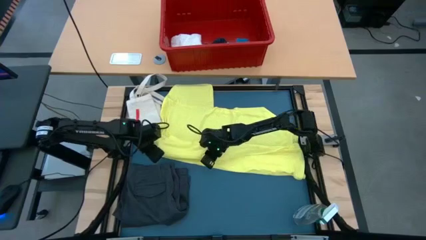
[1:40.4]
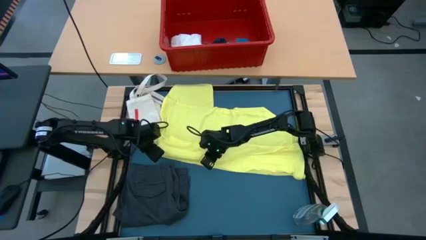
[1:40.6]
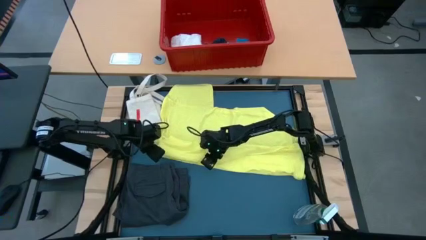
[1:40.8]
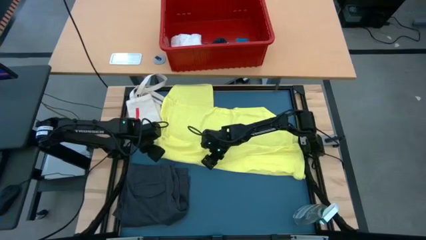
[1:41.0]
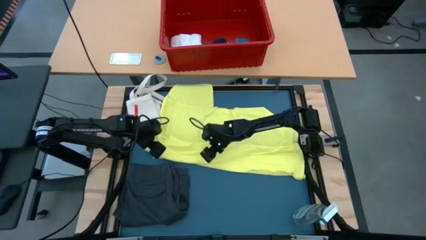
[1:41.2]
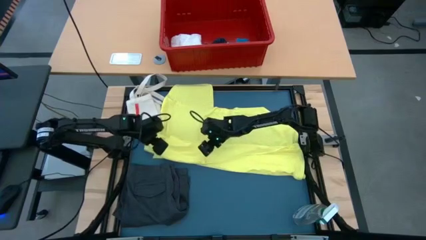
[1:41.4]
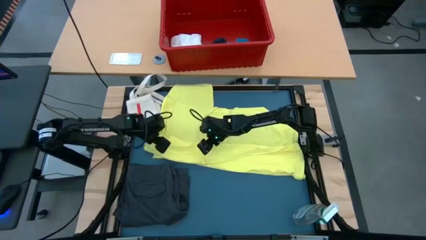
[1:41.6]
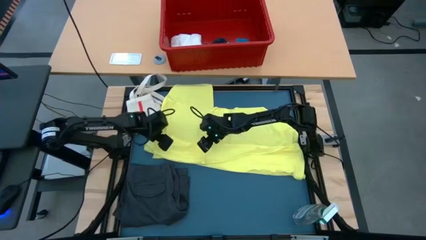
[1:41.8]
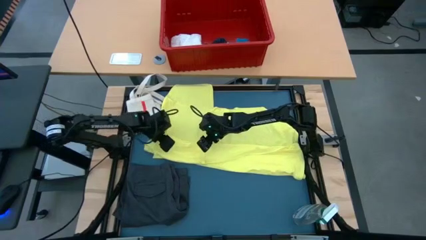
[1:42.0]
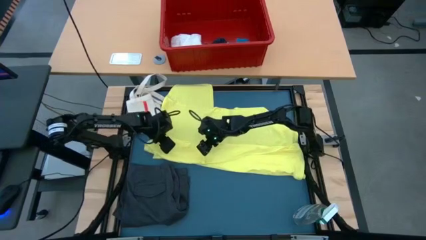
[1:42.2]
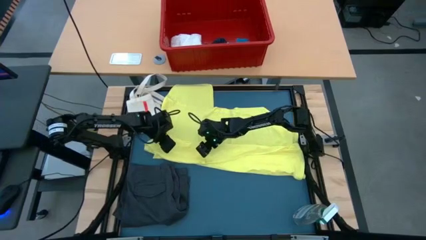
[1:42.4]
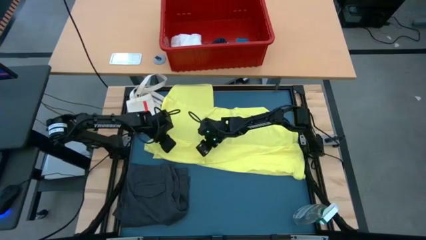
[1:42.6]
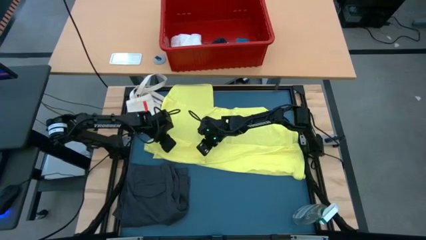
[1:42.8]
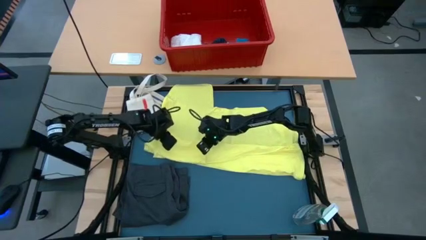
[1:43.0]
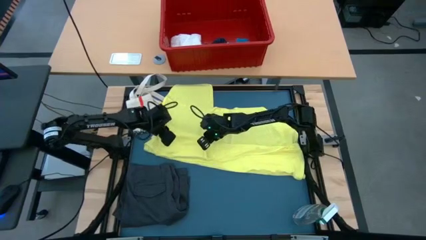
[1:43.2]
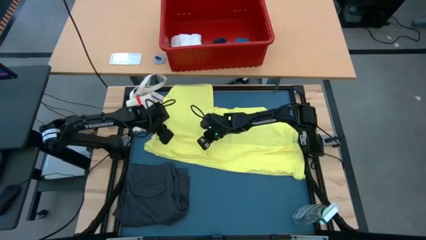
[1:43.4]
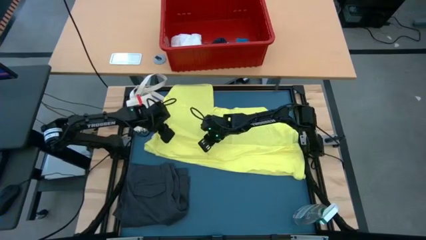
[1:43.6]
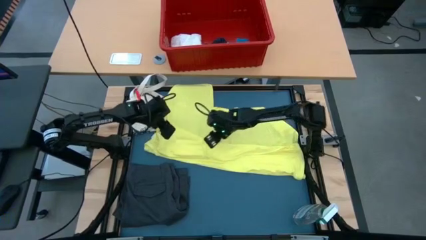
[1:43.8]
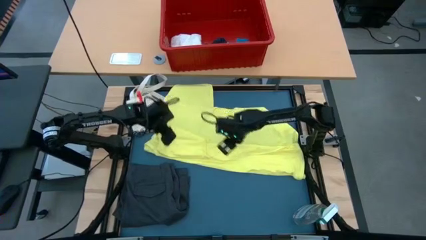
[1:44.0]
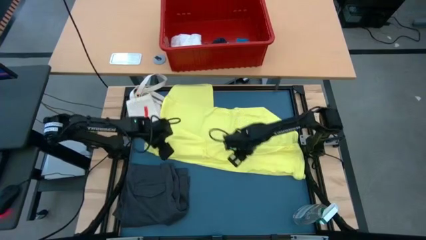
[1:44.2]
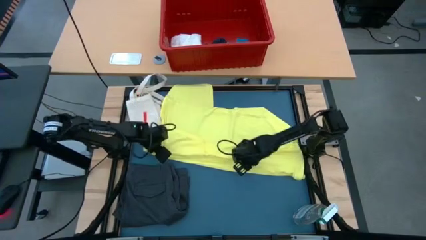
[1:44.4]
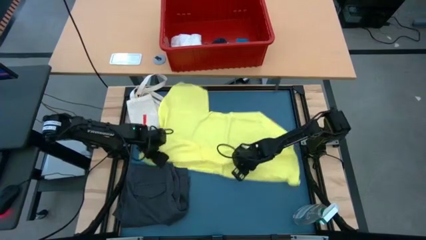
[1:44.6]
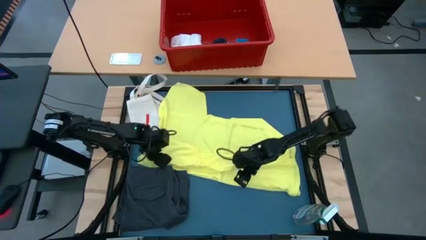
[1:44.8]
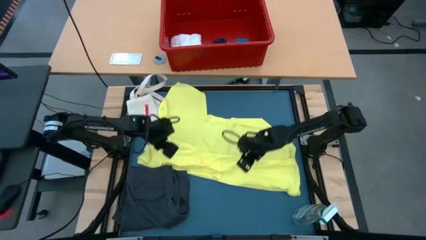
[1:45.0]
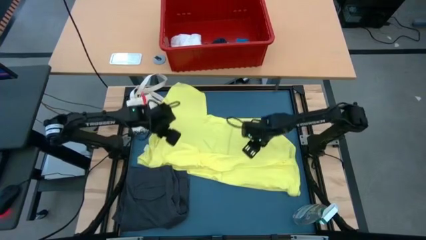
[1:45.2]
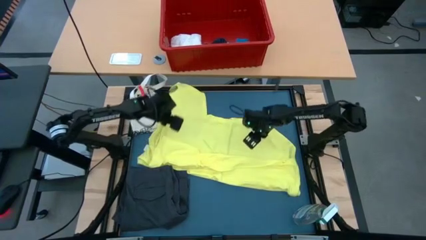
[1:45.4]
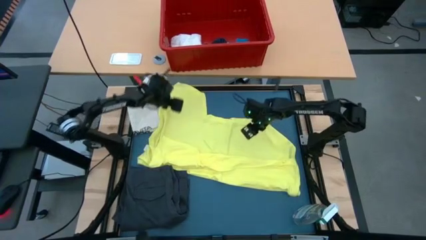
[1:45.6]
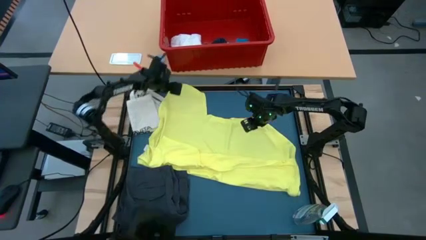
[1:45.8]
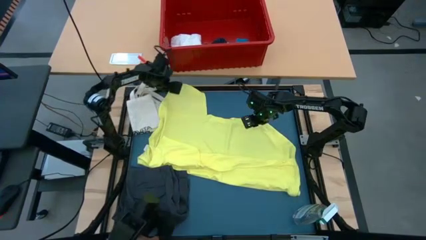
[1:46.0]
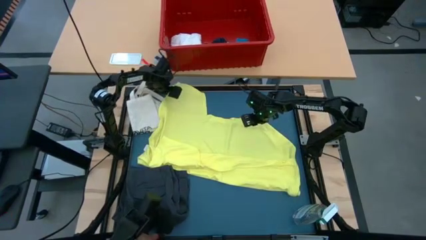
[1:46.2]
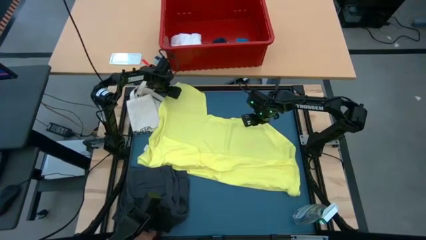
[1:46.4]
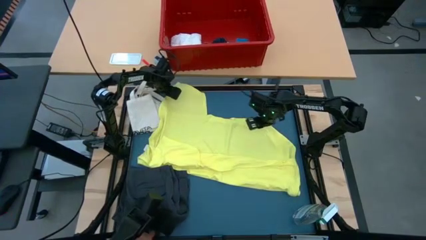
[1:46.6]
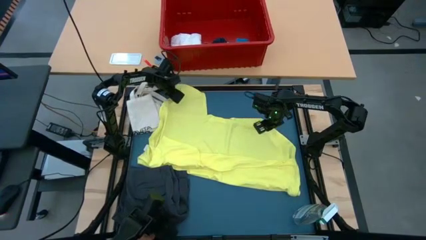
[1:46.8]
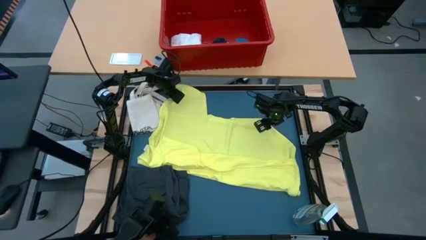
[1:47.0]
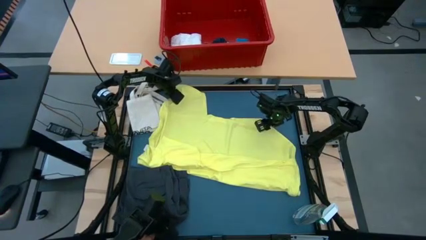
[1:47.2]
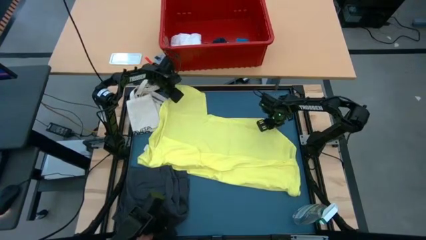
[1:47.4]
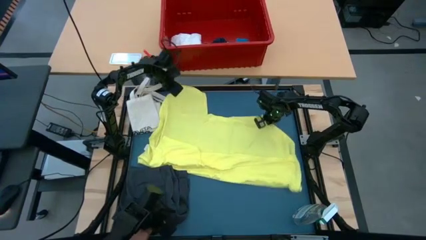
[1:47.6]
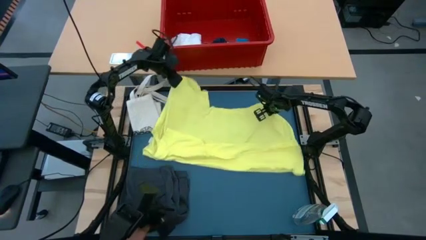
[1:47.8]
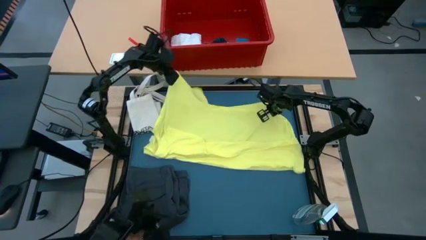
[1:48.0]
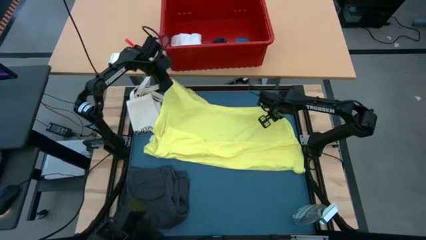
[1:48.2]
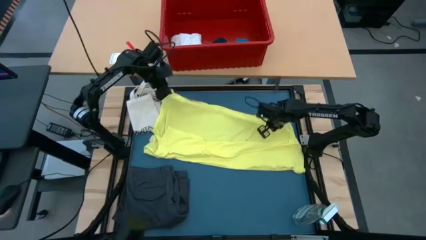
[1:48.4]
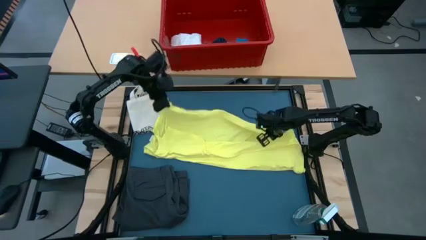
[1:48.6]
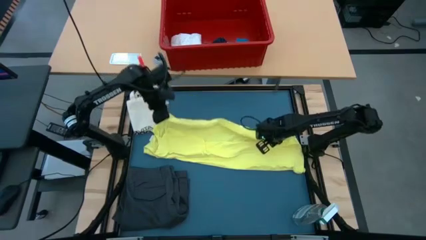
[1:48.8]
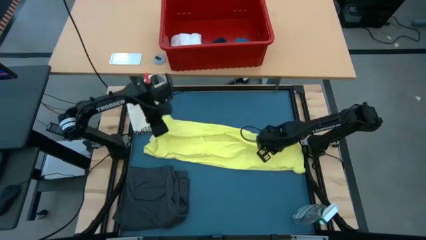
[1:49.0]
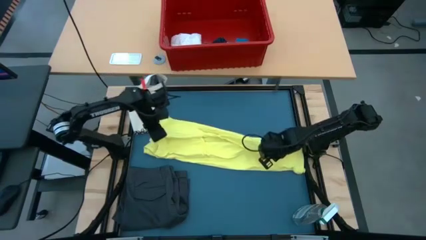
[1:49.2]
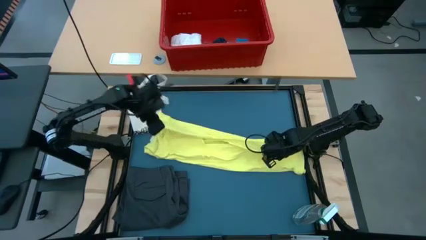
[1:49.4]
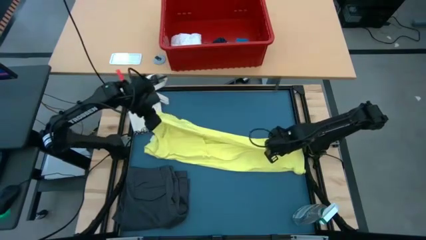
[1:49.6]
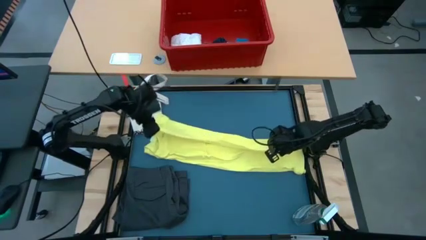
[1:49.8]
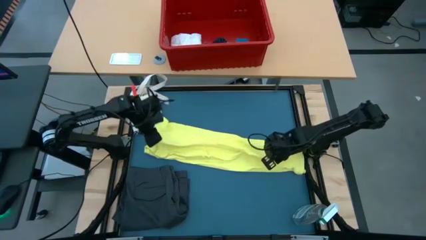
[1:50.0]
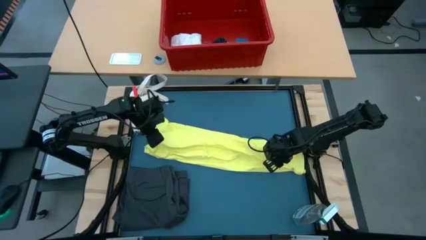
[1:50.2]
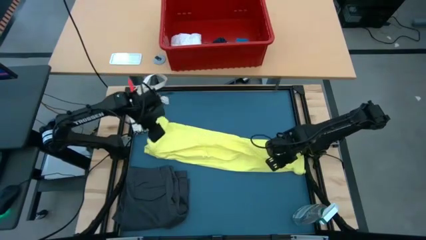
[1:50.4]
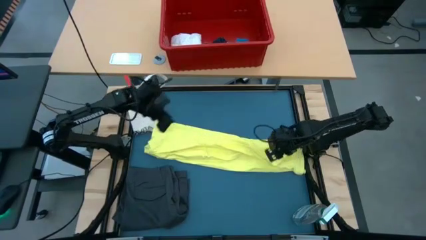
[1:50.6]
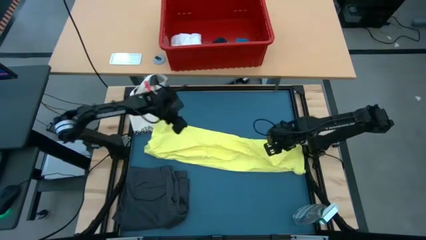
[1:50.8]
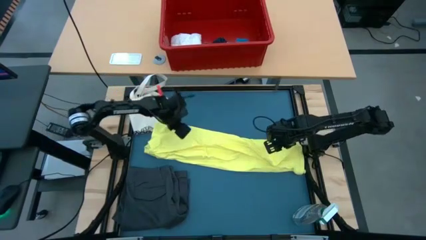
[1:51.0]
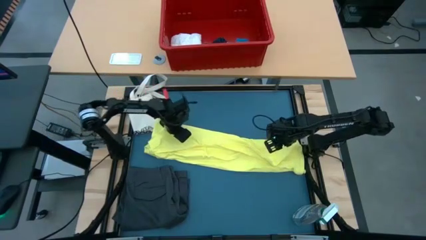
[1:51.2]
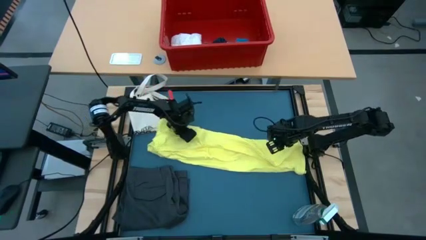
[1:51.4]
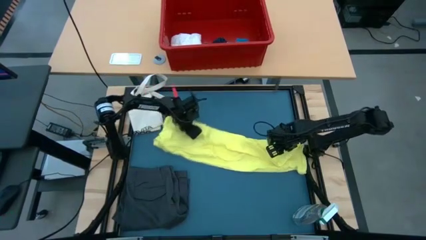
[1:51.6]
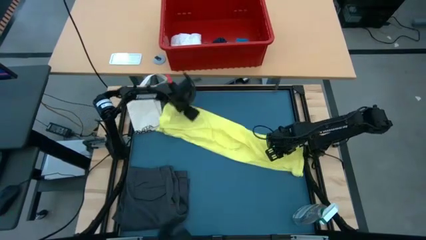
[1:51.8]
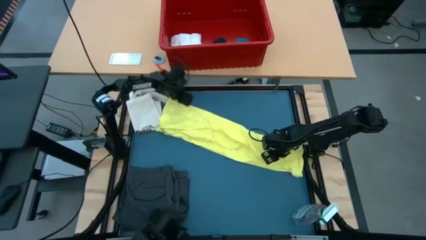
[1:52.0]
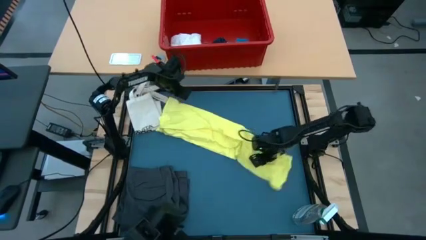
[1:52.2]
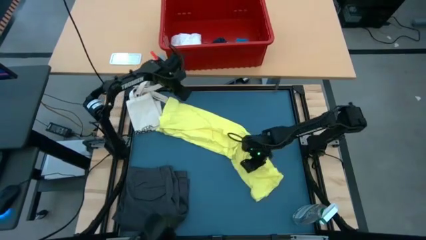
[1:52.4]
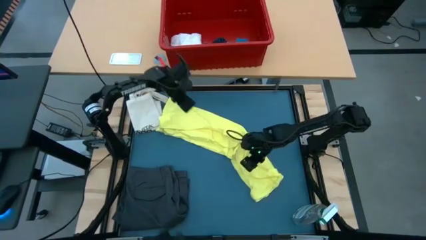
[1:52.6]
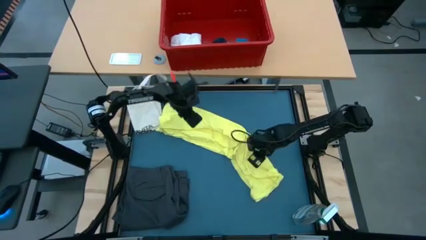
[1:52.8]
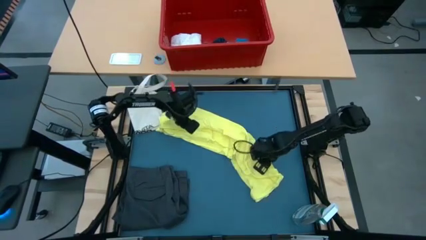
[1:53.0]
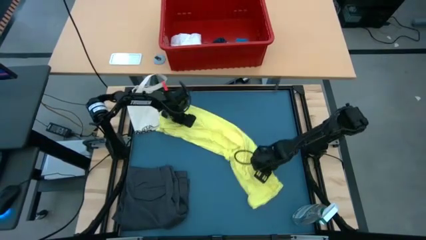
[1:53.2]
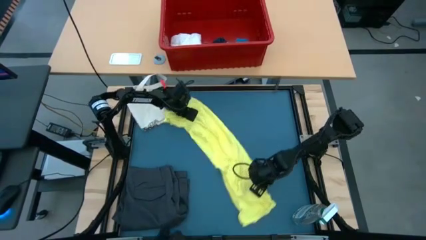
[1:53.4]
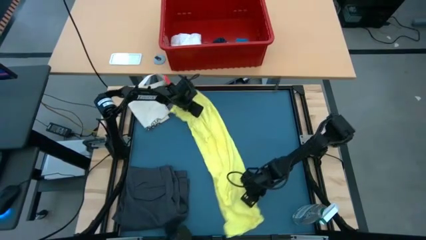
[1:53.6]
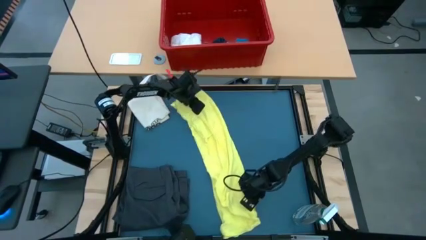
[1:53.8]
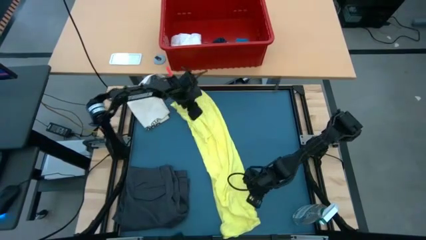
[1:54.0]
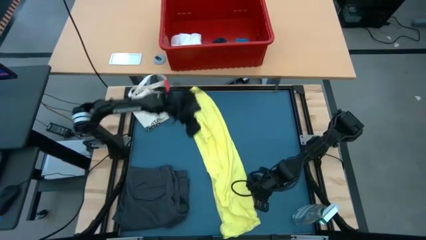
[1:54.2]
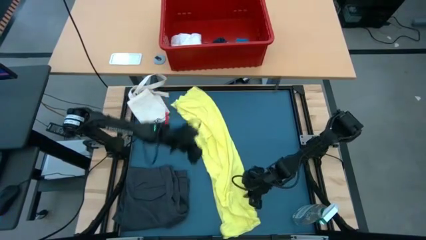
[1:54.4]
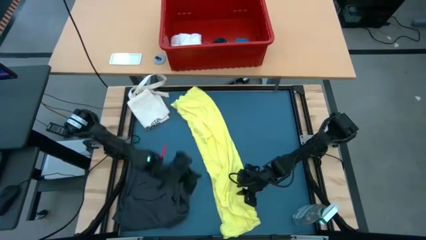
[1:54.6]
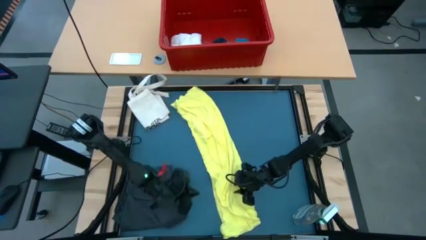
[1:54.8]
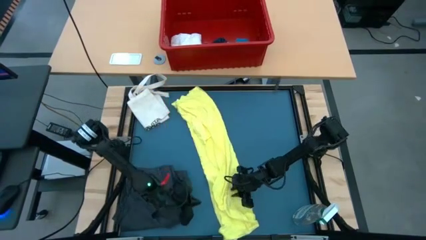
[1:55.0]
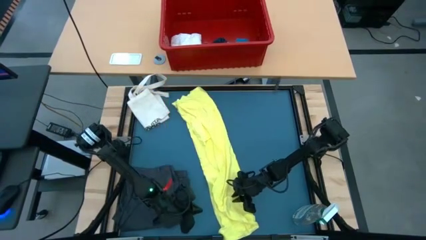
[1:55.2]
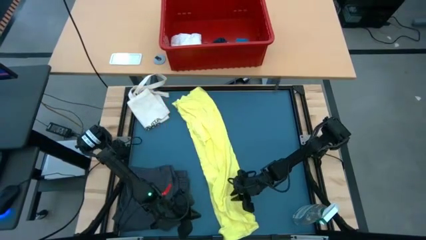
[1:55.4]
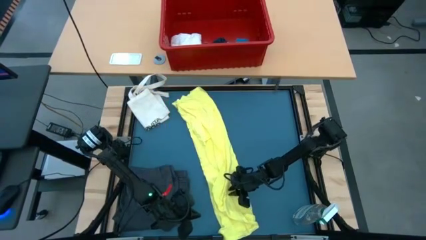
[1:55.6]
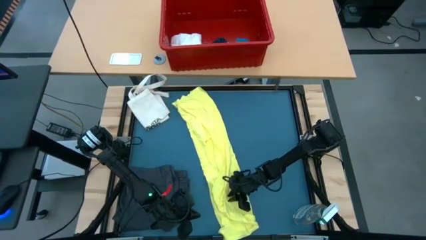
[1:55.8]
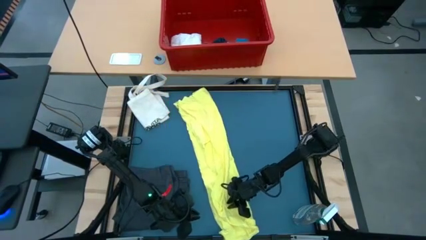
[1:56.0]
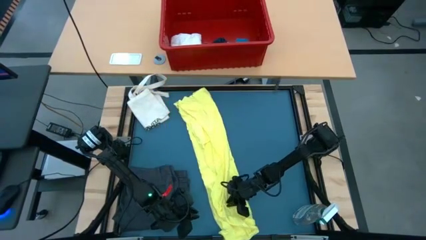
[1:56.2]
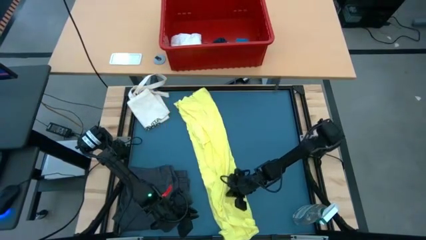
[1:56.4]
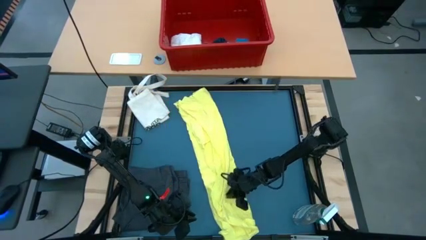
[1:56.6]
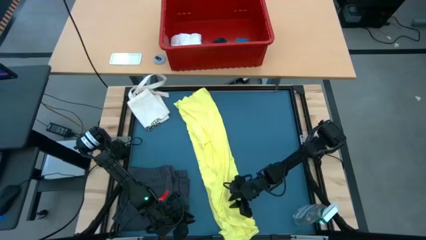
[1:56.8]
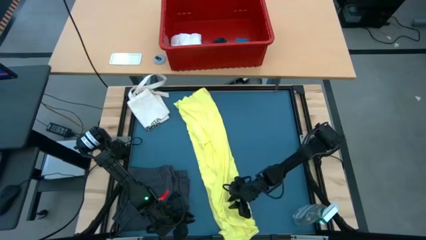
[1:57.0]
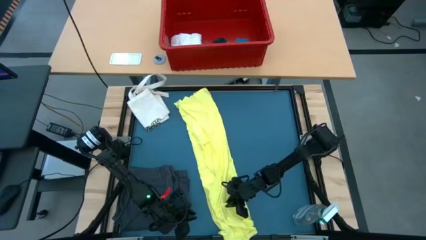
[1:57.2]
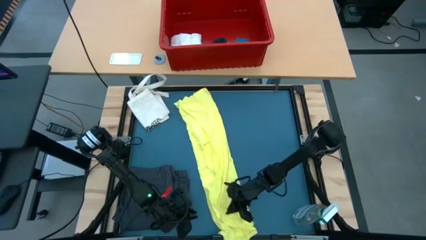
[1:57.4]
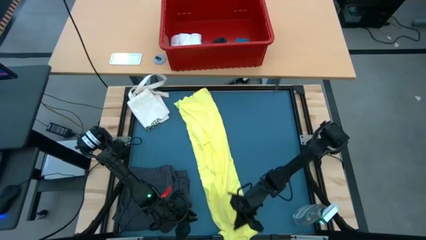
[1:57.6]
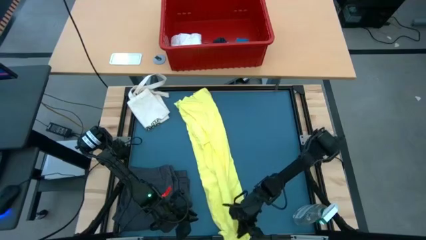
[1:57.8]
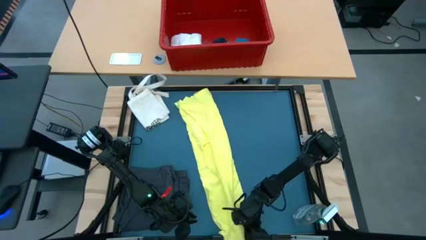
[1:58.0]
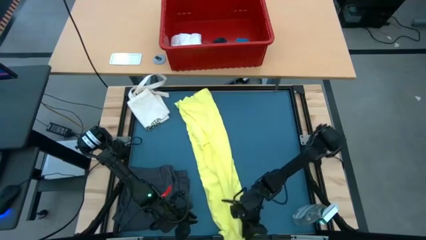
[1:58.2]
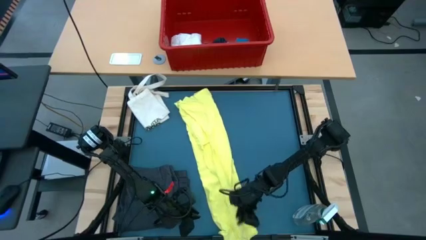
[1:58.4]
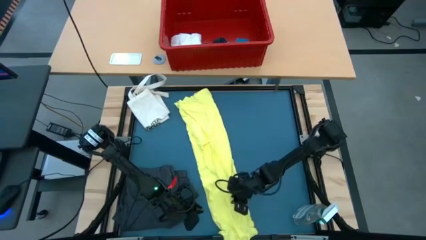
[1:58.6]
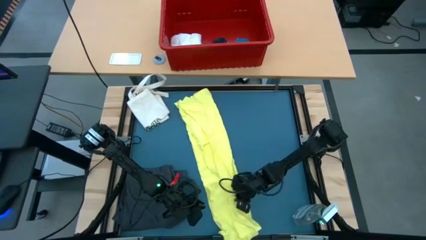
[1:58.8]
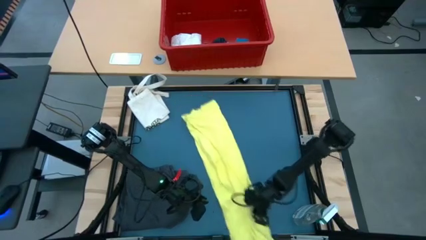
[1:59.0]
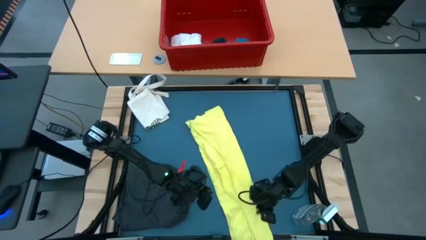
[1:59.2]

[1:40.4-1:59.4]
Task: Fold laundry
Fold the yellow shirt
